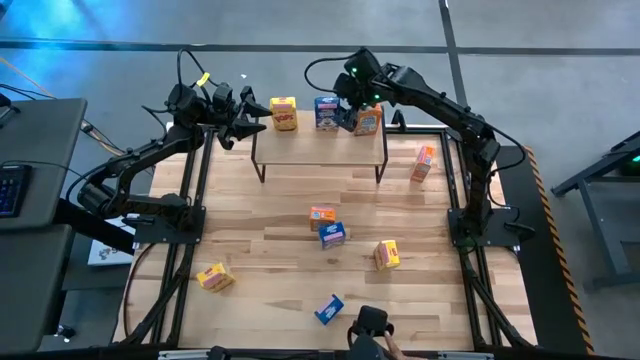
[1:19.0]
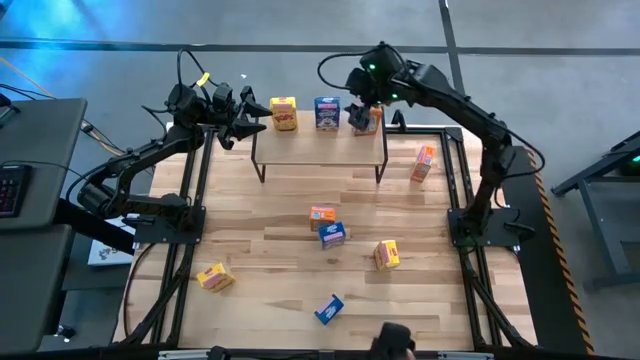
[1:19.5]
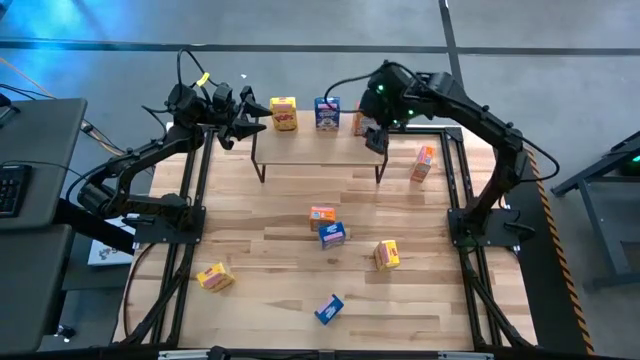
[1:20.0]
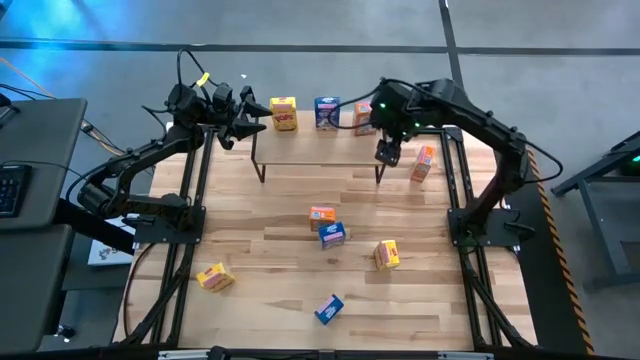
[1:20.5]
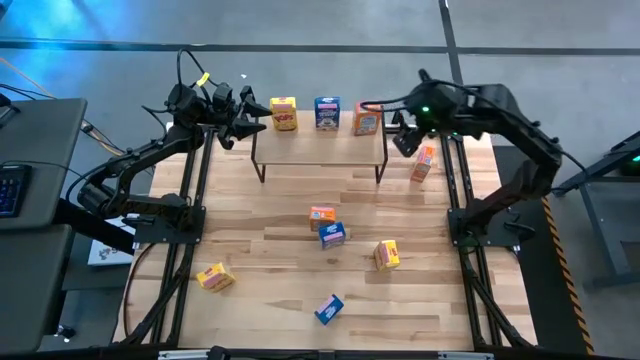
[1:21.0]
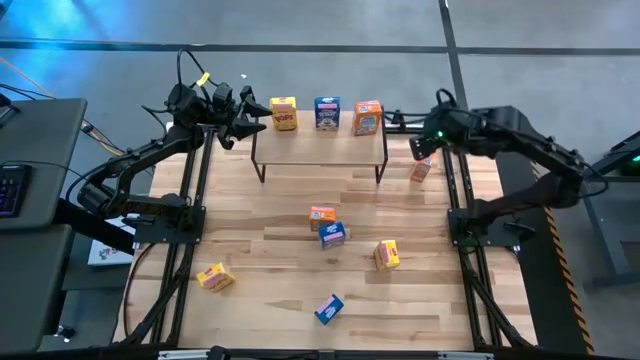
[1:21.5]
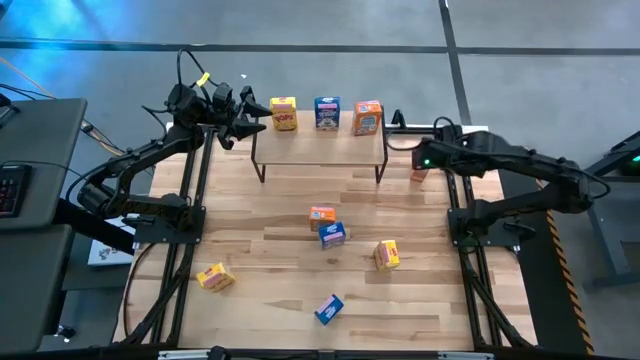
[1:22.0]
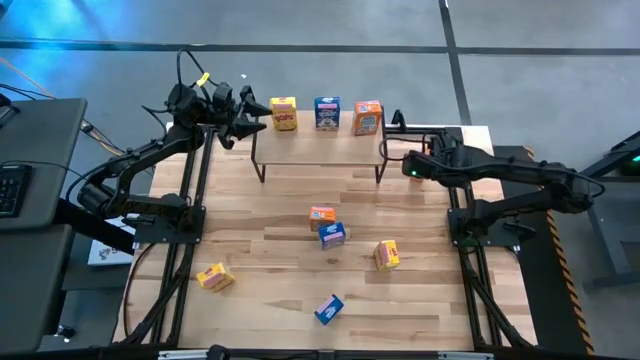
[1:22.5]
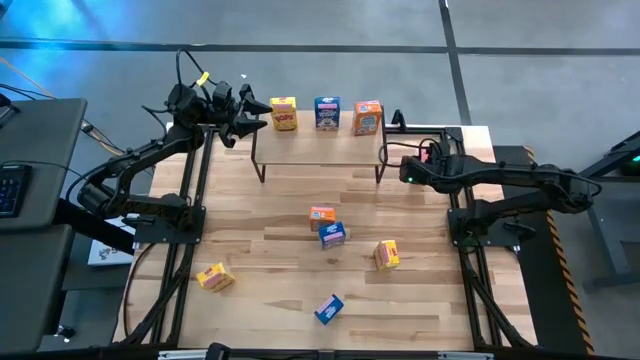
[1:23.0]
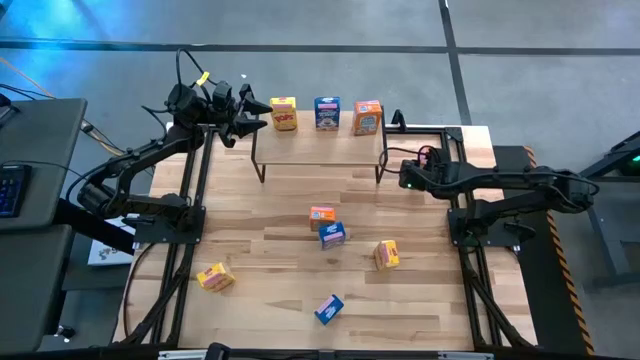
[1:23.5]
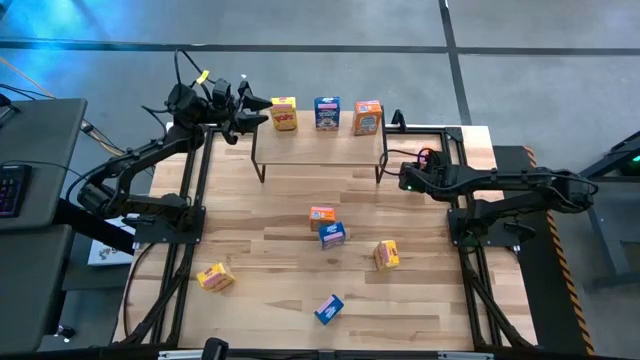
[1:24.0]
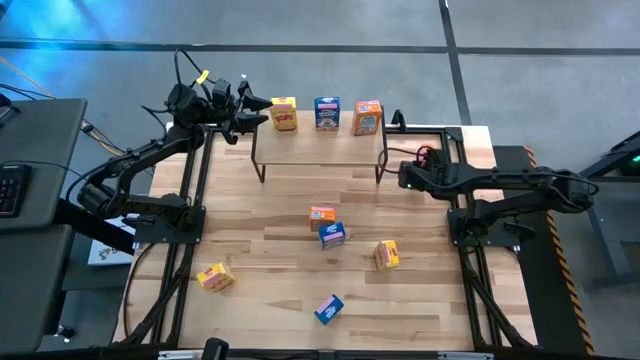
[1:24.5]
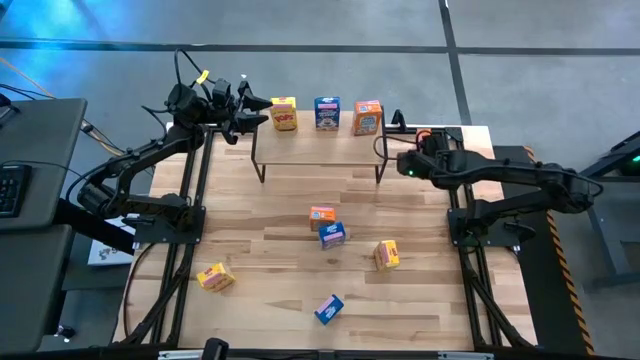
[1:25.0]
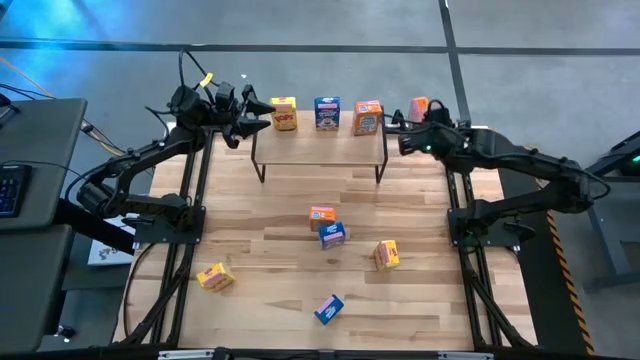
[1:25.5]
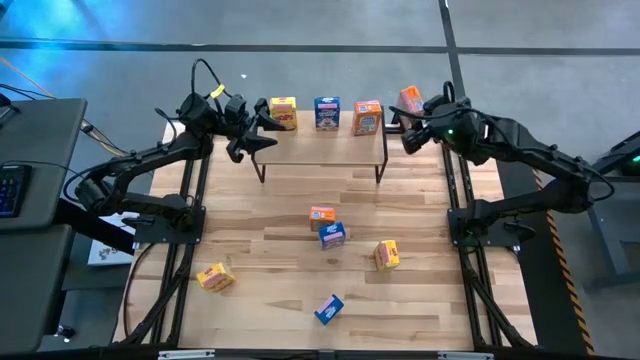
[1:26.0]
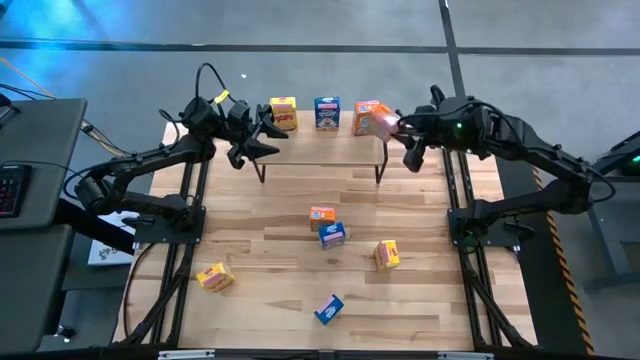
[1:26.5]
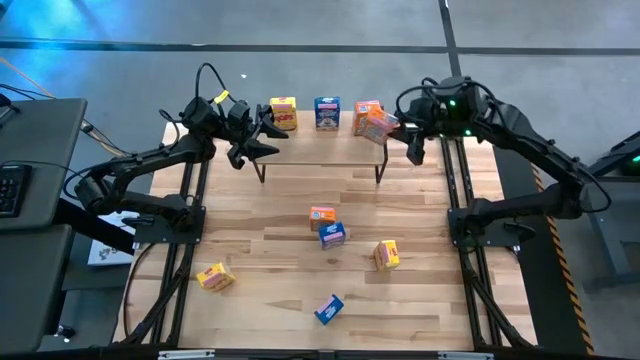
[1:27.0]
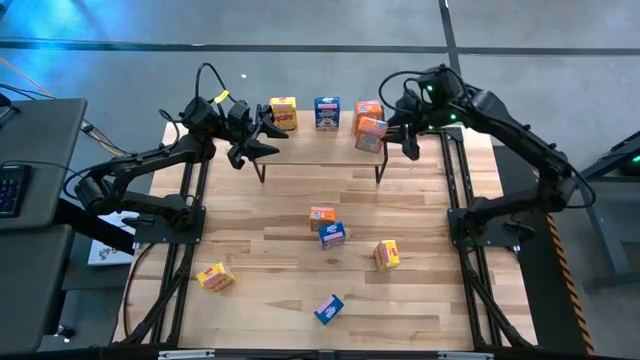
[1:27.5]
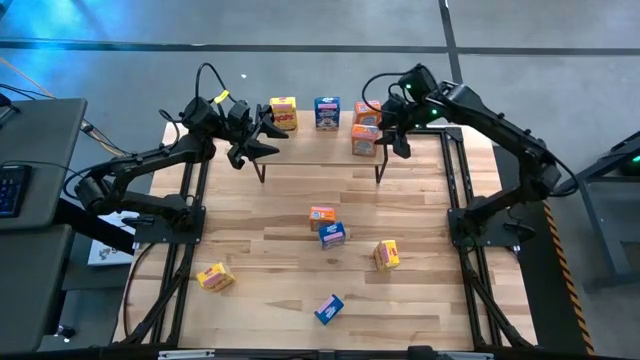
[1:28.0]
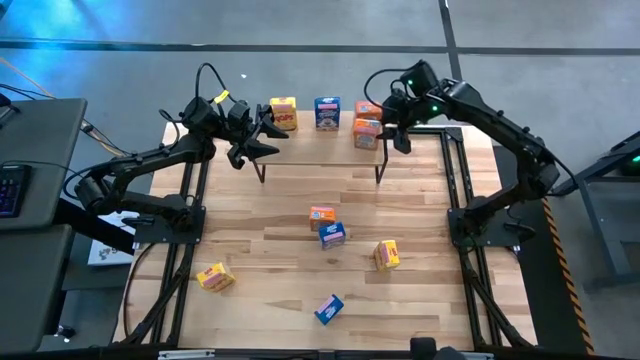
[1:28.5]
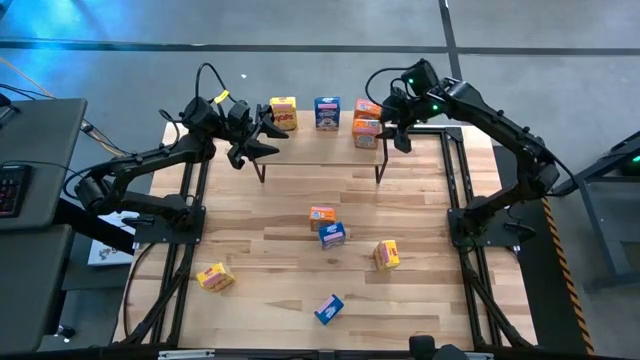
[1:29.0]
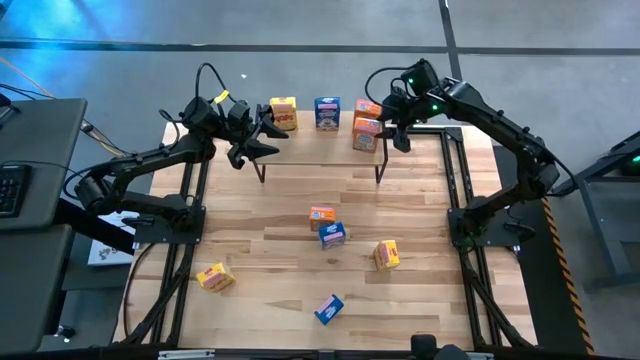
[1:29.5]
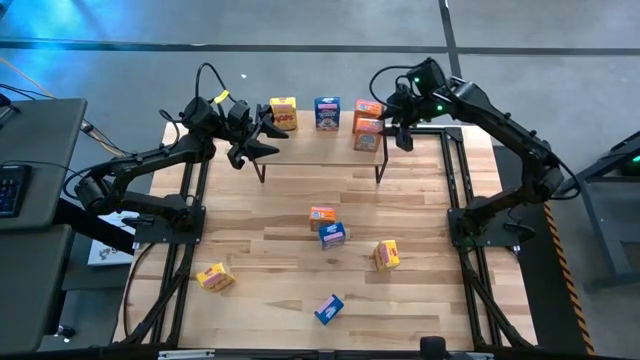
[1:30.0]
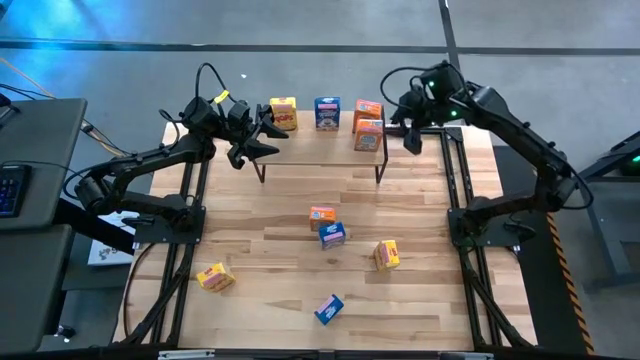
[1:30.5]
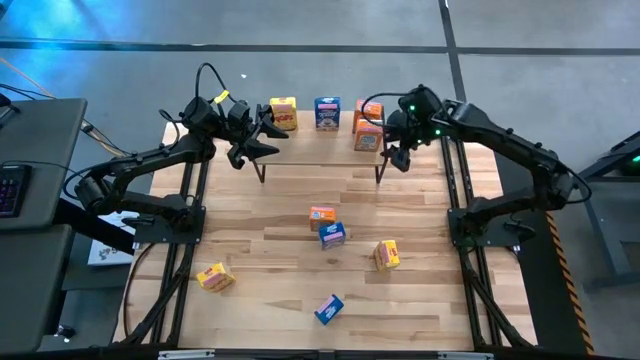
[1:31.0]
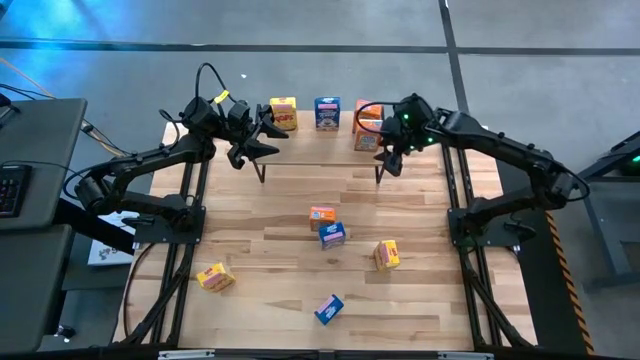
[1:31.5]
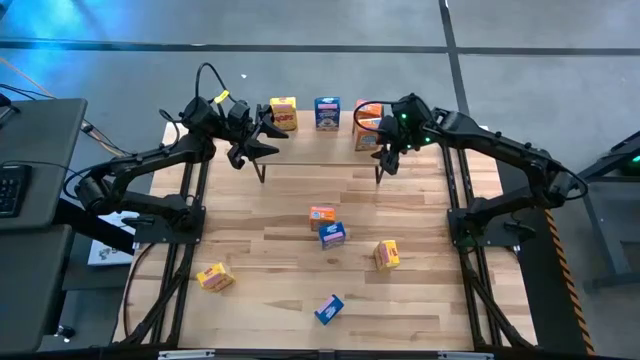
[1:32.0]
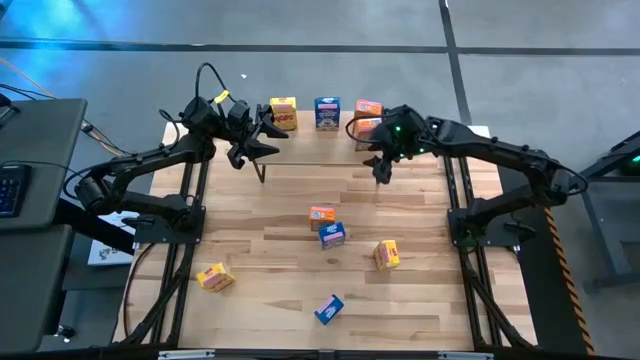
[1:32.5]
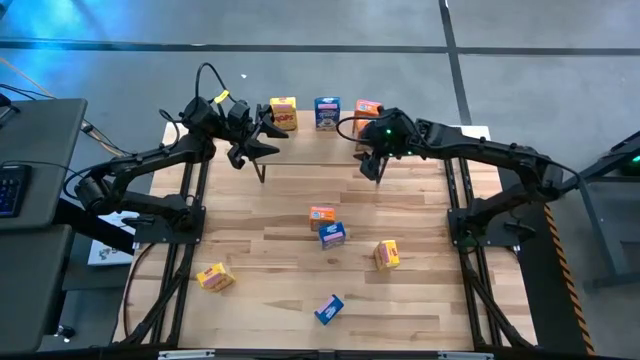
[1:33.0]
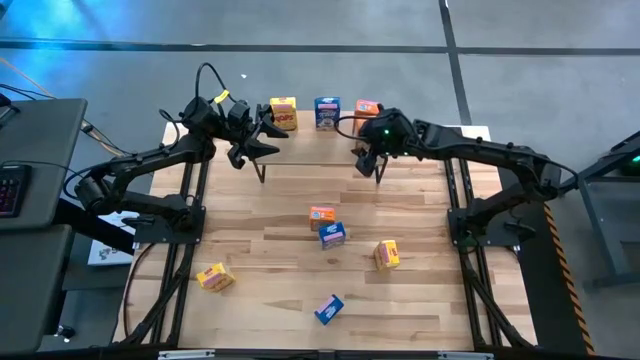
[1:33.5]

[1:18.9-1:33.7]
Task: Stack cereal on shelf
Put the top orange box on the shelf aligned with the other orange cereal box

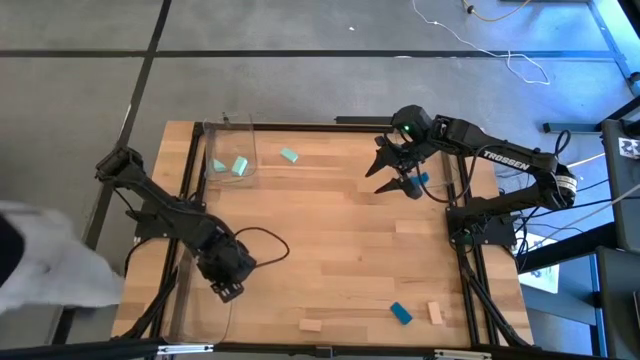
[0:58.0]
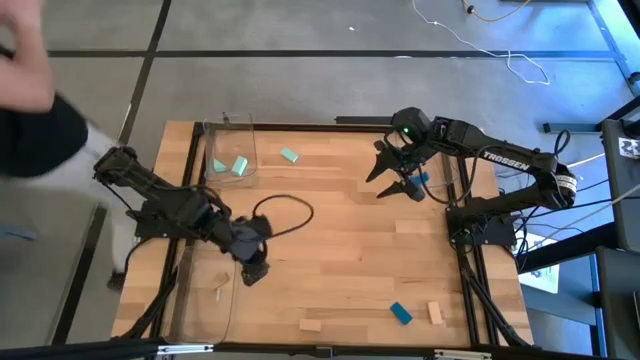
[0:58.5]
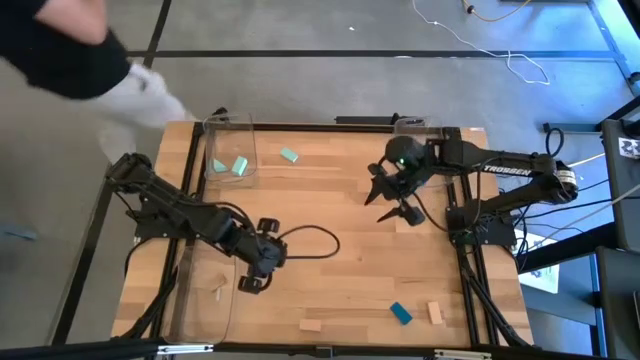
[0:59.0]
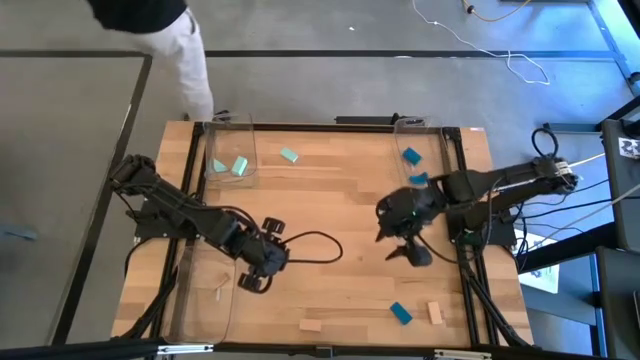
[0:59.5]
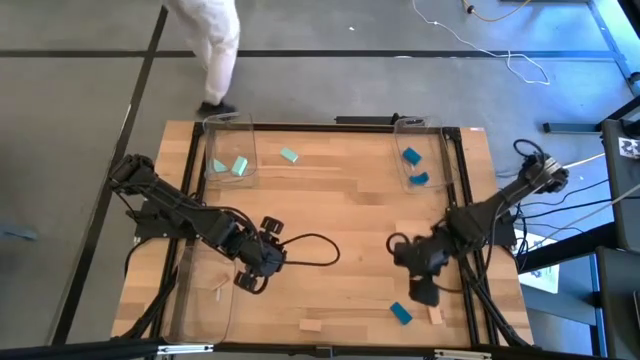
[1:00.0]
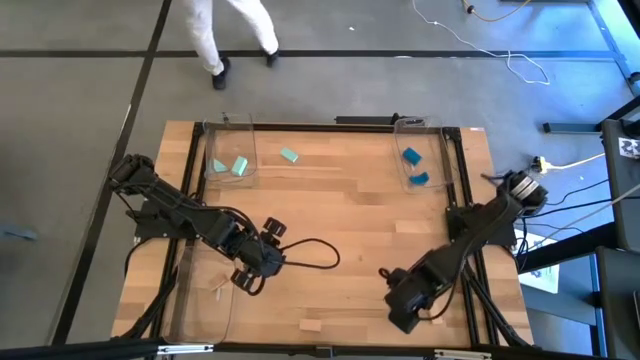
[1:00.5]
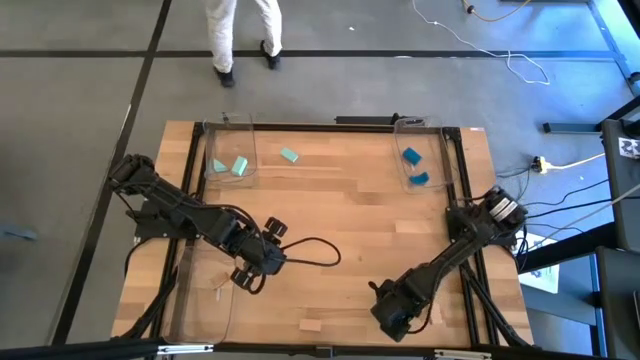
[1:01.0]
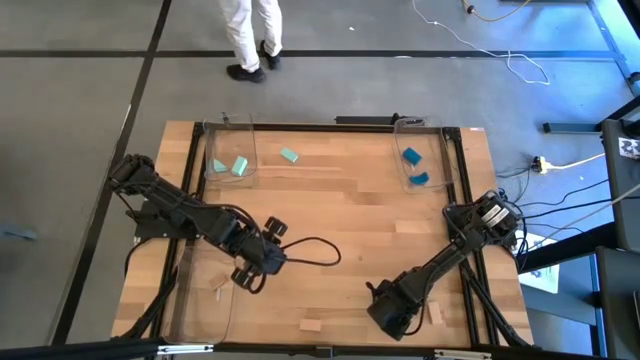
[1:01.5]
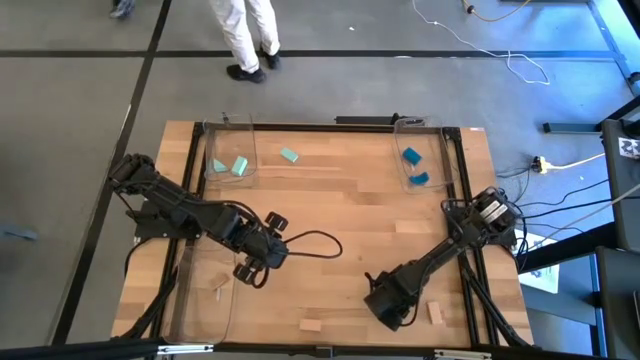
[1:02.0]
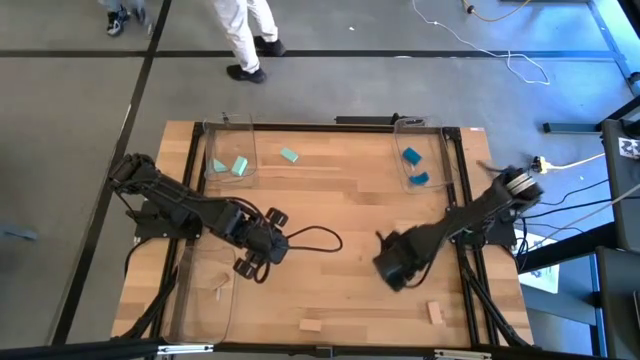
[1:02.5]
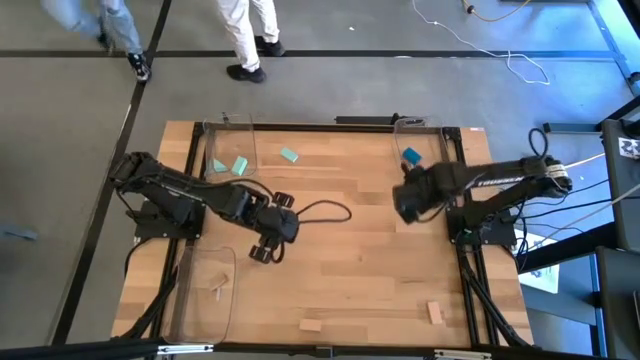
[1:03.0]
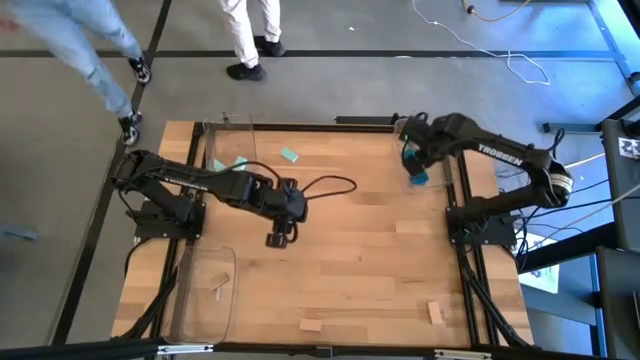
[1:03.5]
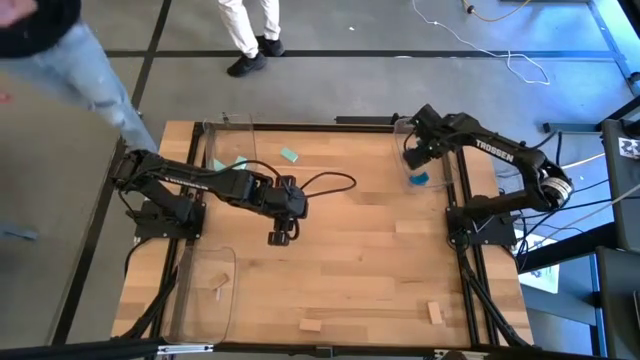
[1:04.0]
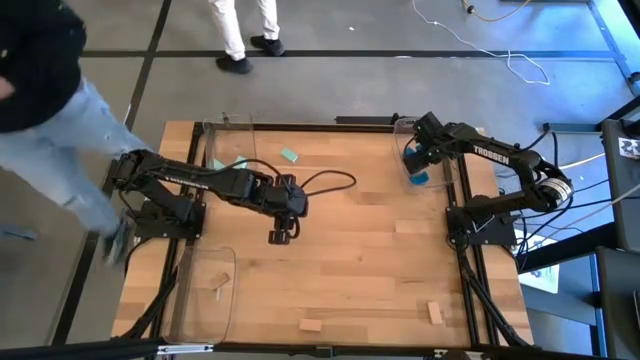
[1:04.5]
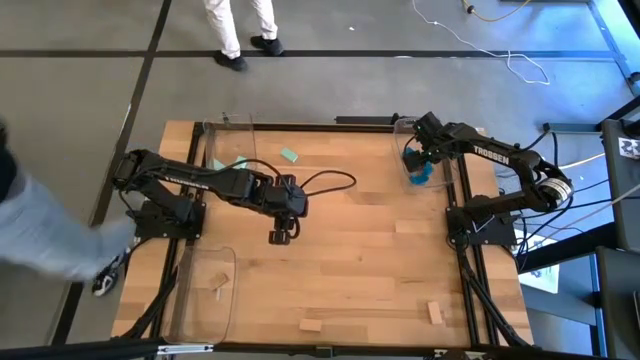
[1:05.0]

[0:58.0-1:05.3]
Task: Sort & place blocks by color
Put the blue block into the top right transparent bin
